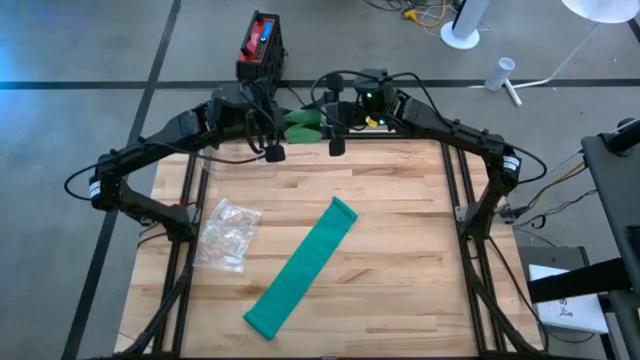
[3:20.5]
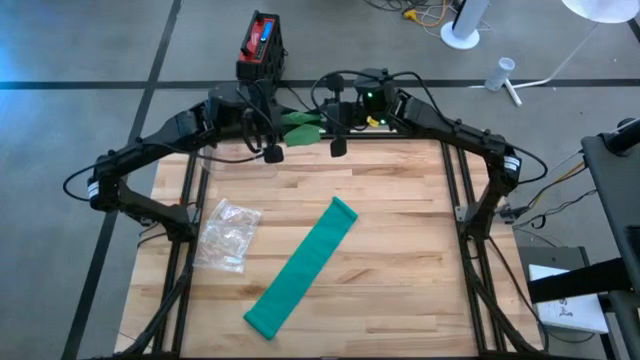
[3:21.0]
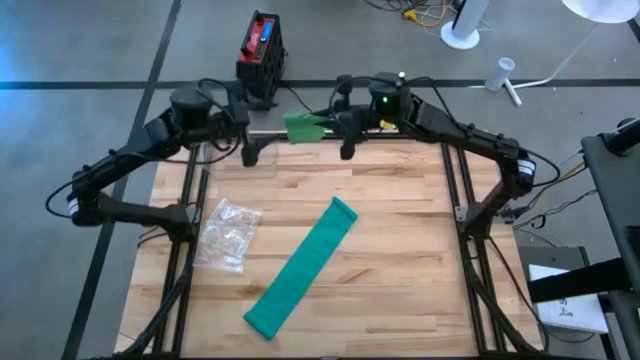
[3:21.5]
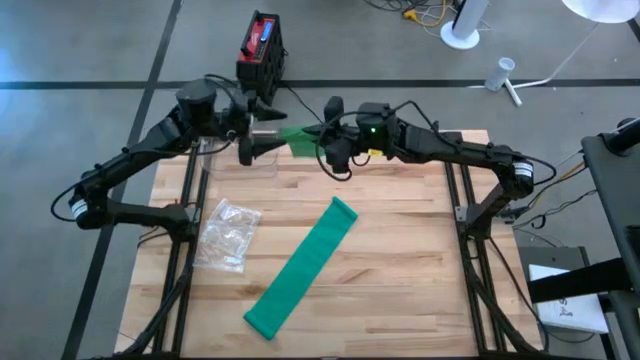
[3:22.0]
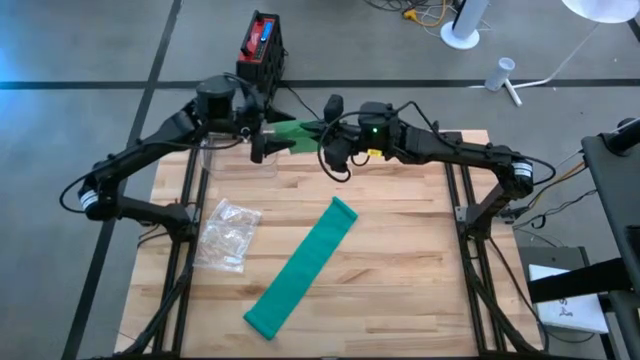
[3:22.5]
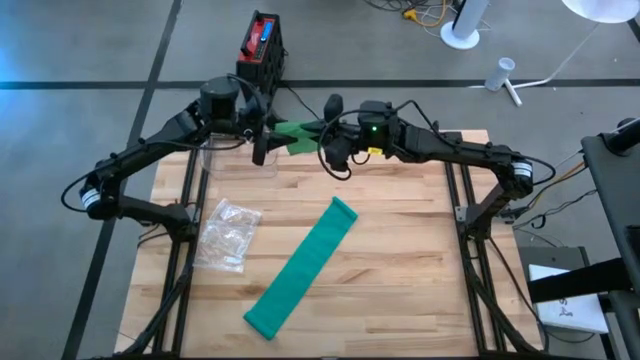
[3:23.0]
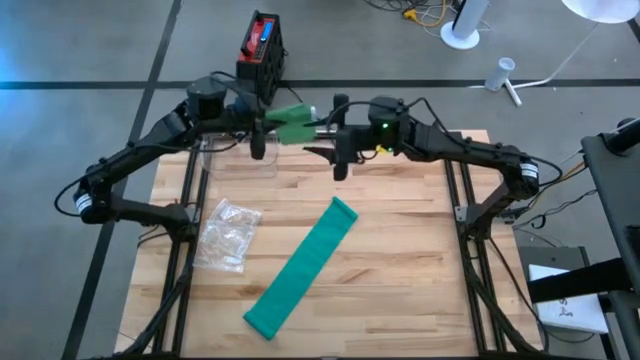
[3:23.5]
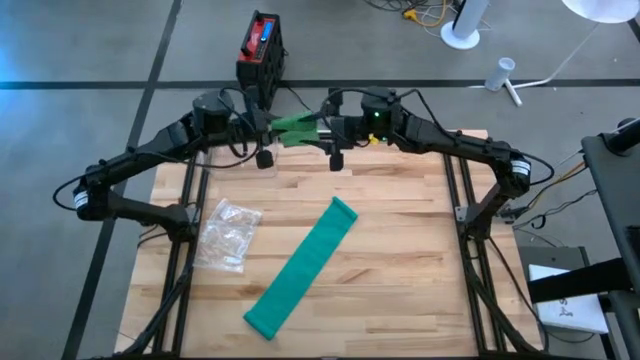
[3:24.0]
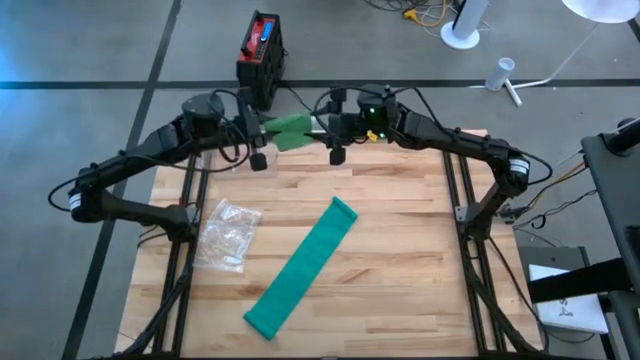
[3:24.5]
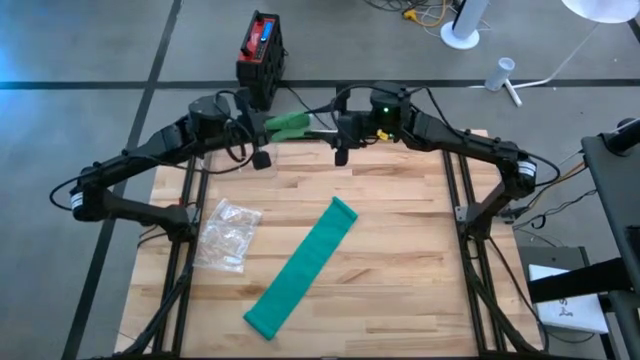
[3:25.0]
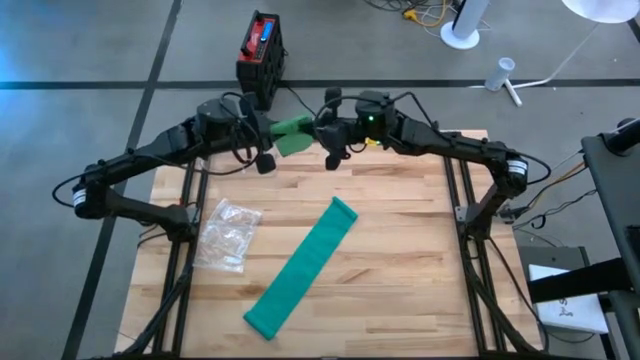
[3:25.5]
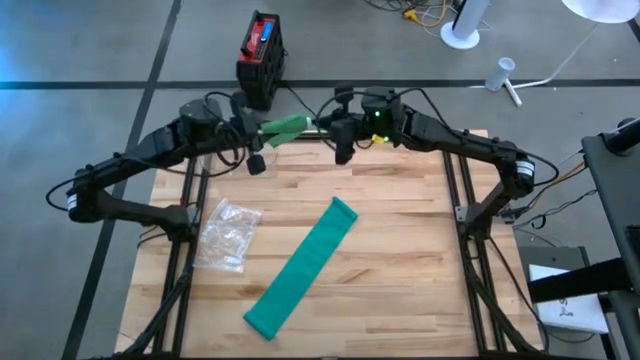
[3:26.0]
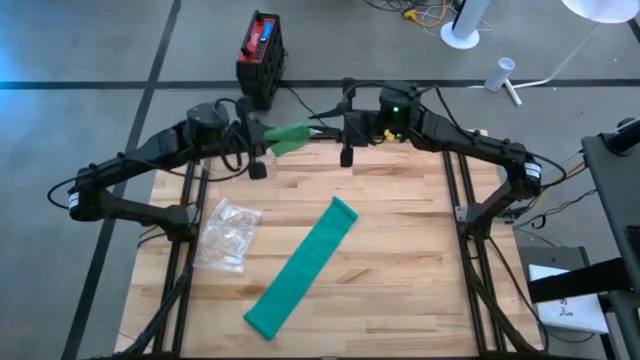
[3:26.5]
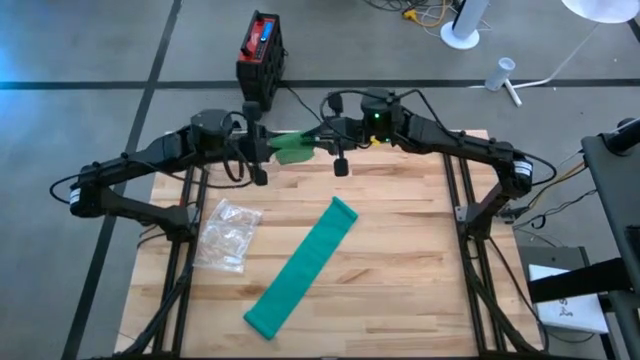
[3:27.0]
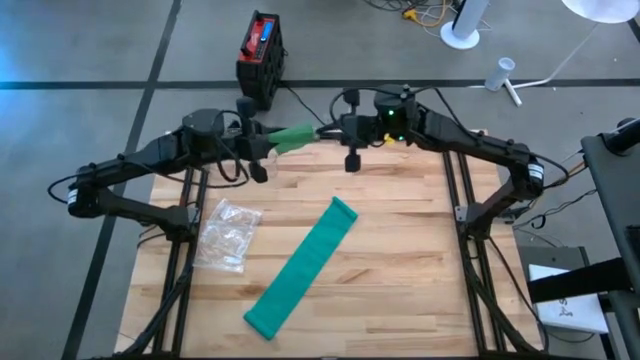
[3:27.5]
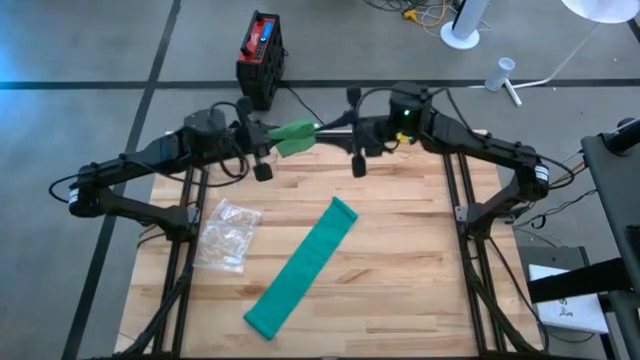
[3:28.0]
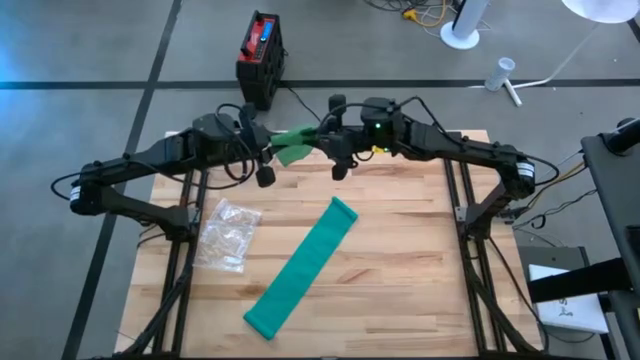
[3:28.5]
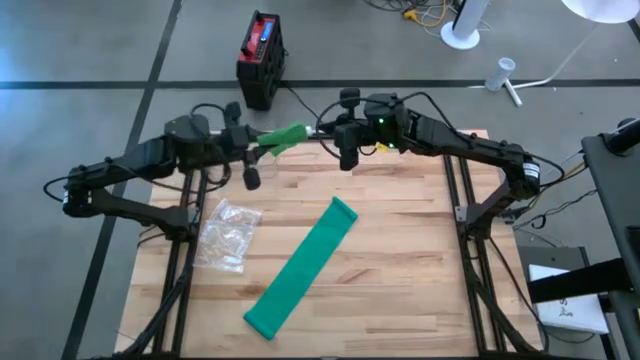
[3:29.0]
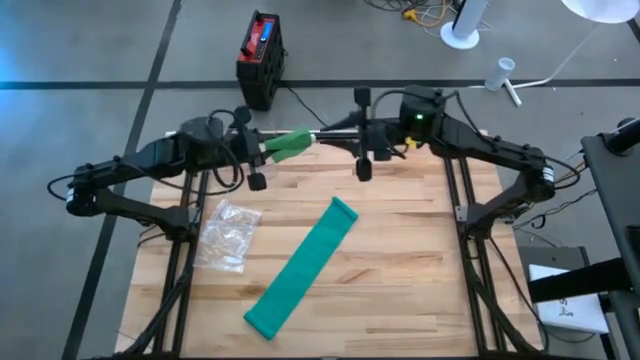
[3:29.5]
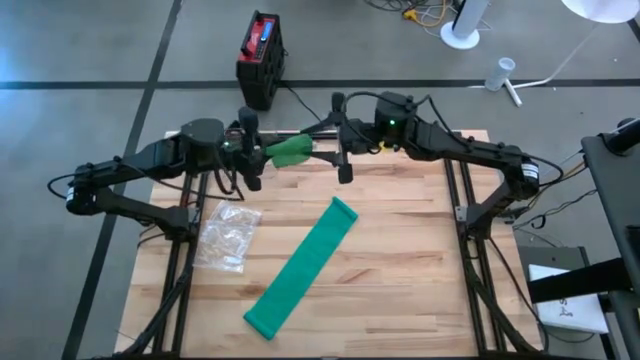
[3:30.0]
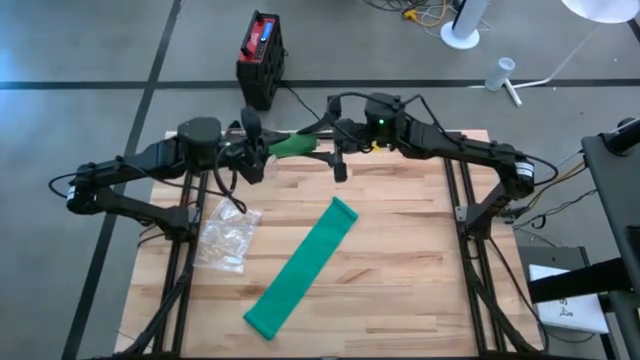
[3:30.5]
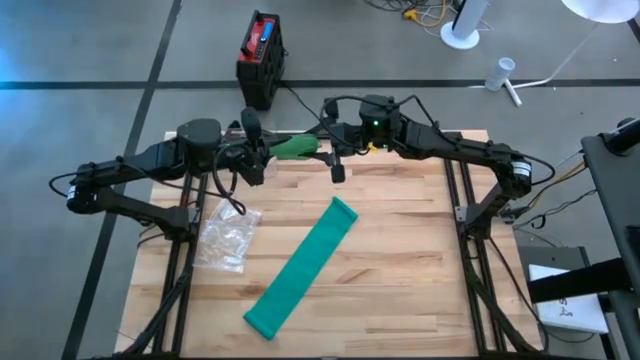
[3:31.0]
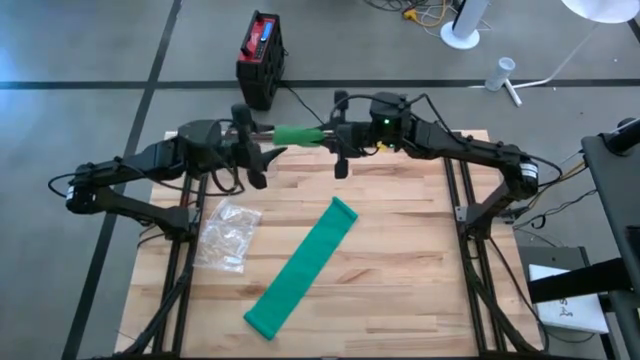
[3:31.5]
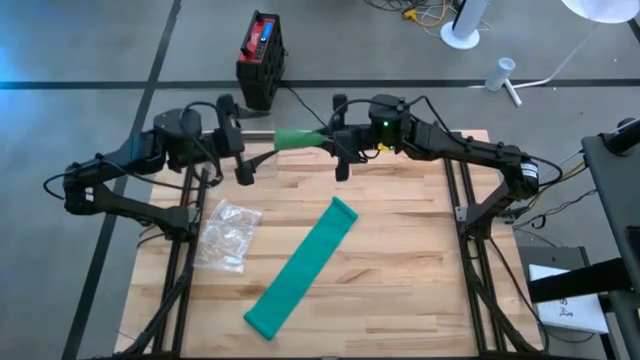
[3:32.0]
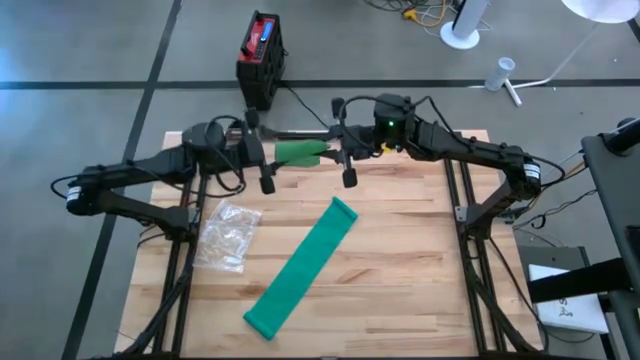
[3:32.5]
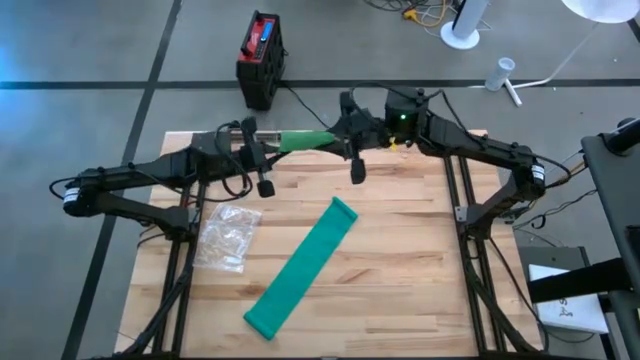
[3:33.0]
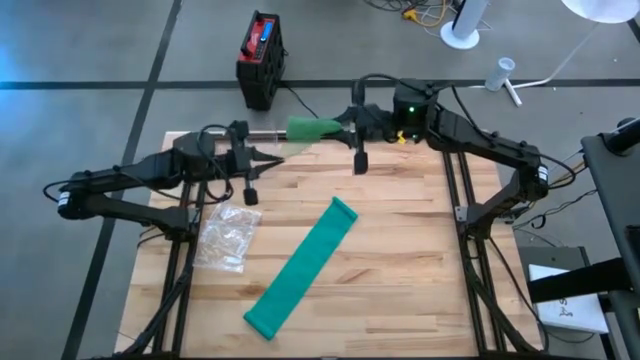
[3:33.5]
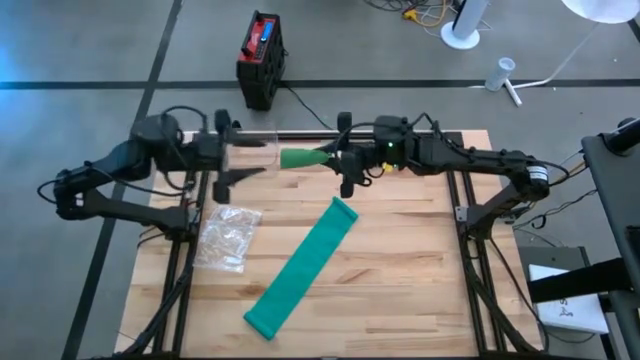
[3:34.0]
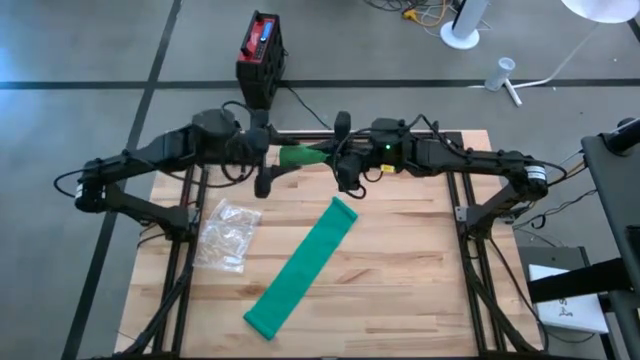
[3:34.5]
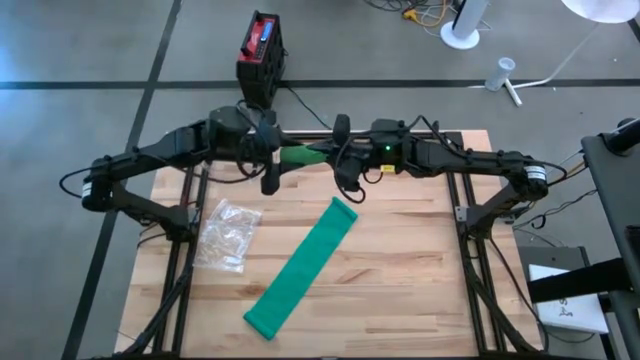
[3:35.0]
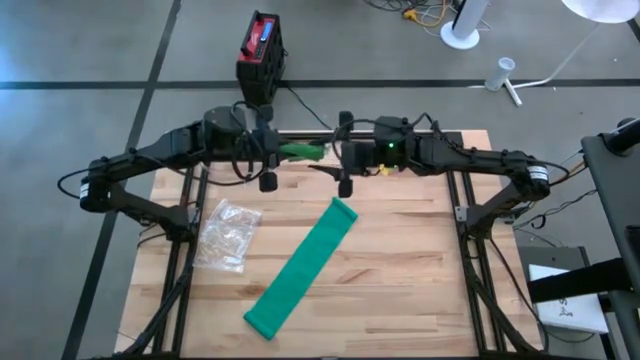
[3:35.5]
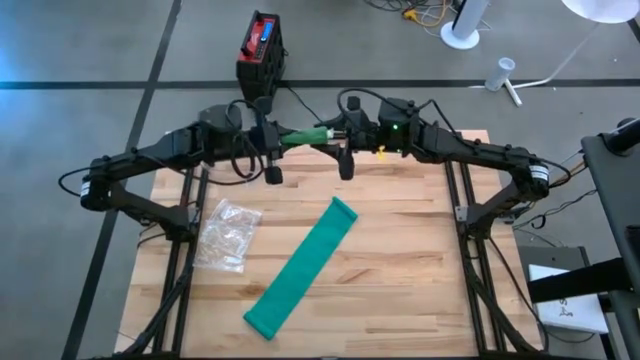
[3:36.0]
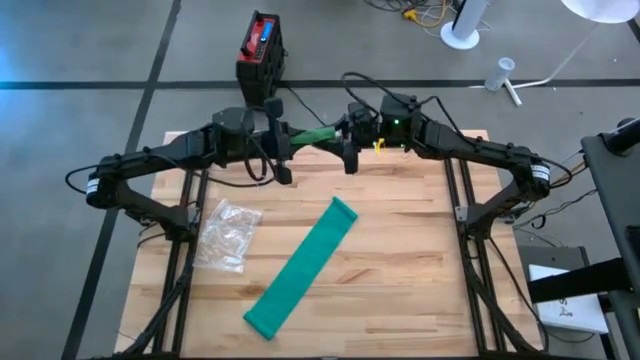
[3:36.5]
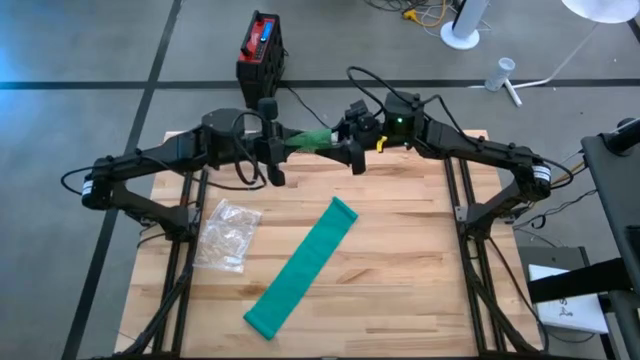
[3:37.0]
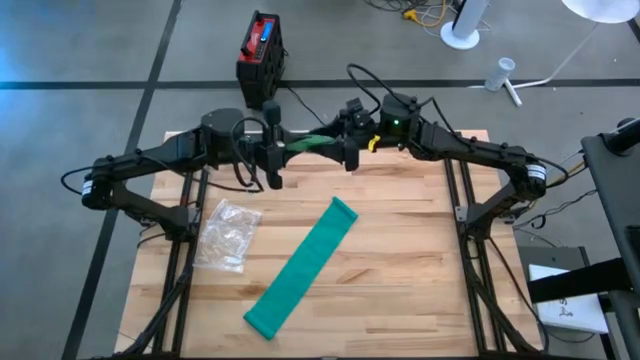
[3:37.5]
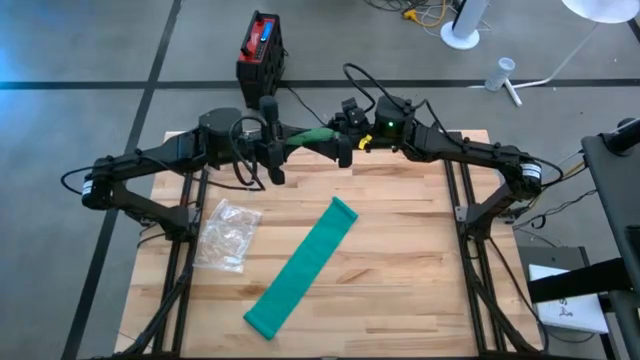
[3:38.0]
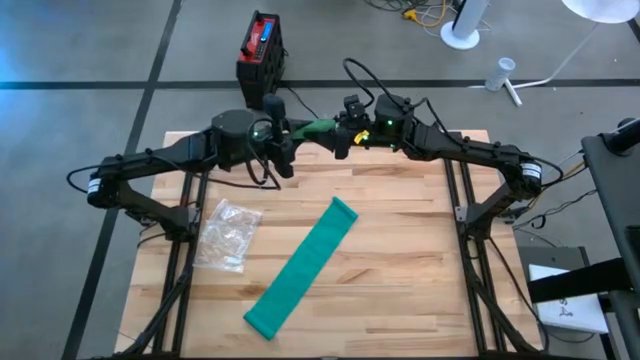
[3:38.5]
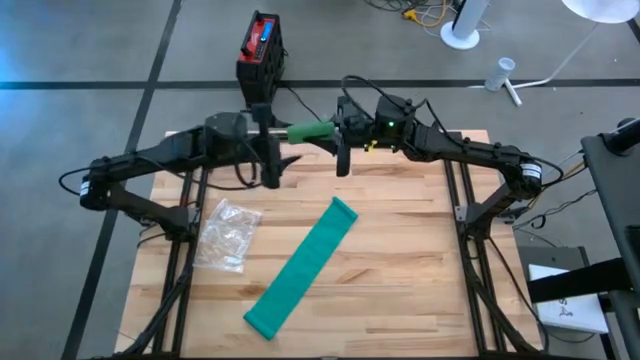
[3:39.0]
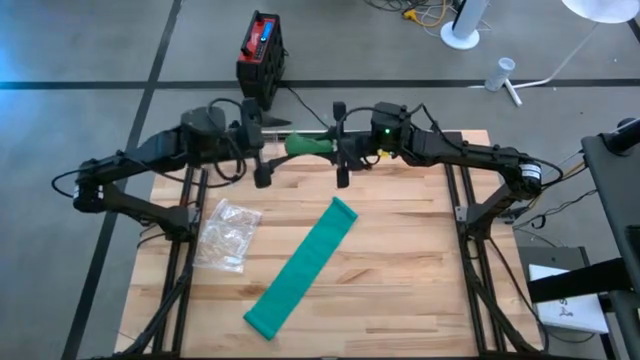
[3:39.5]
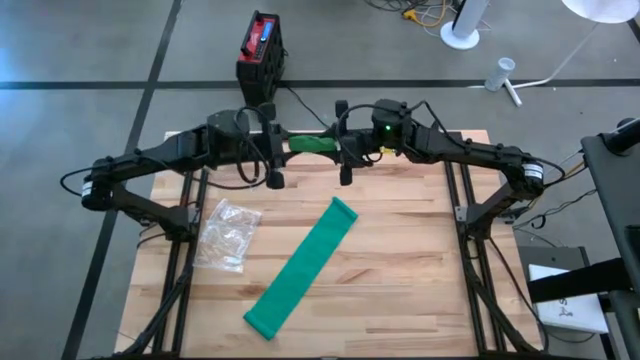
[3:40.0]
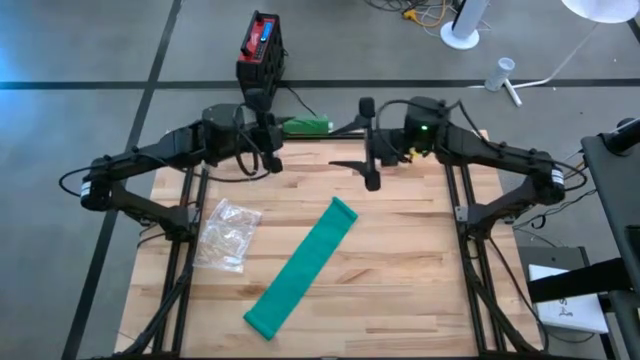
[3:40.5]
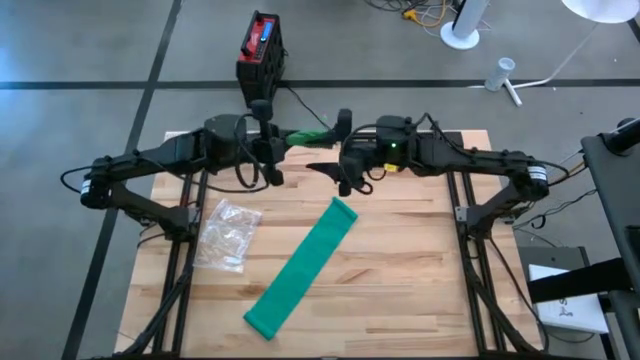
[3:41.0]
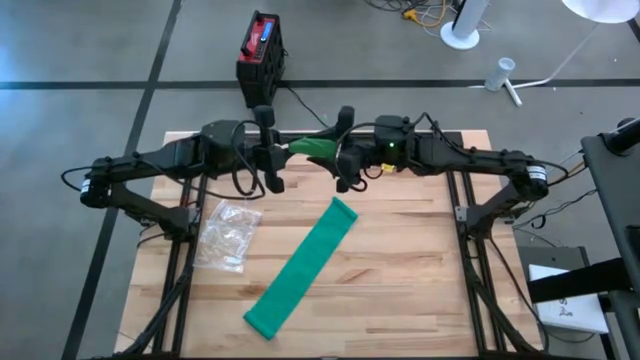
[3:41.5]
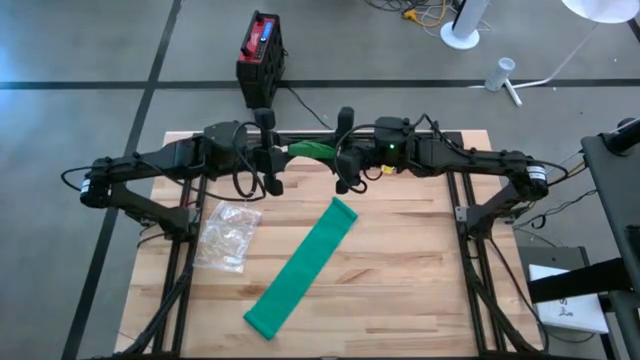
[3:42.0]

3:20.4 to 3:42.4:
Task: Roll bandage
Roll the green bandage
